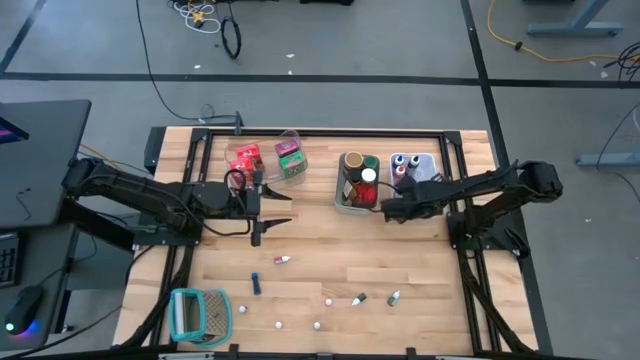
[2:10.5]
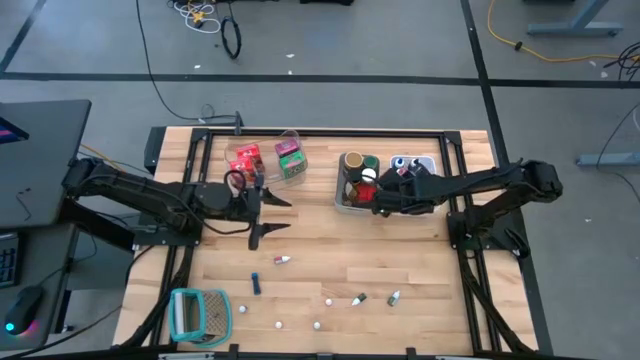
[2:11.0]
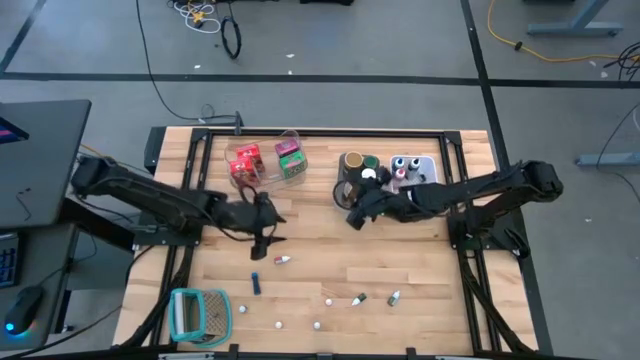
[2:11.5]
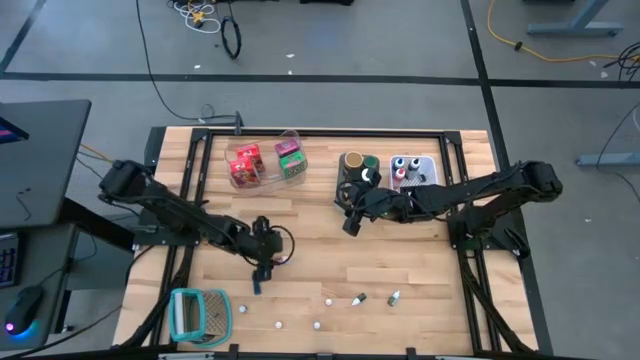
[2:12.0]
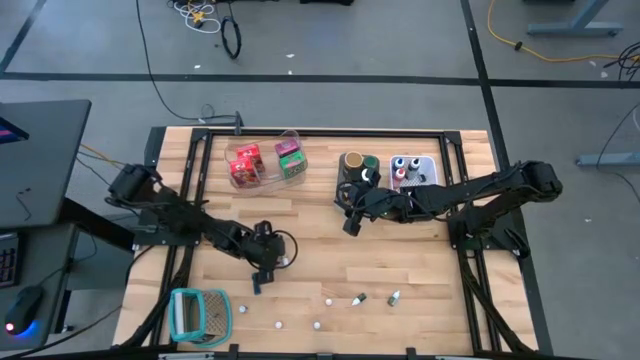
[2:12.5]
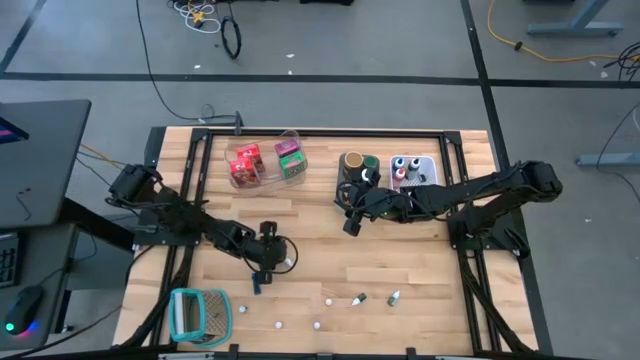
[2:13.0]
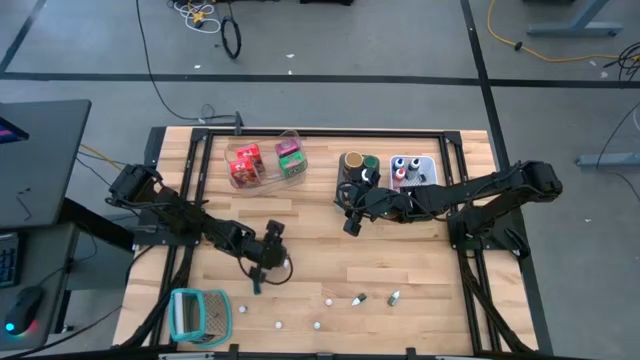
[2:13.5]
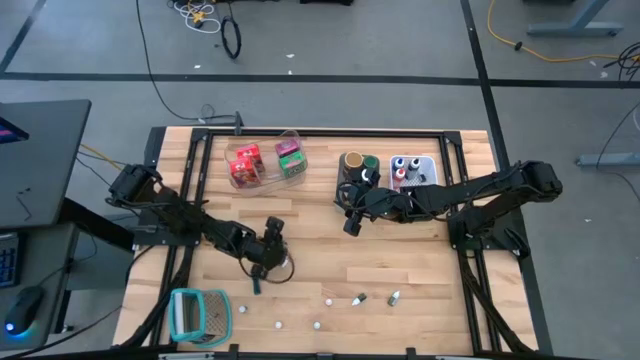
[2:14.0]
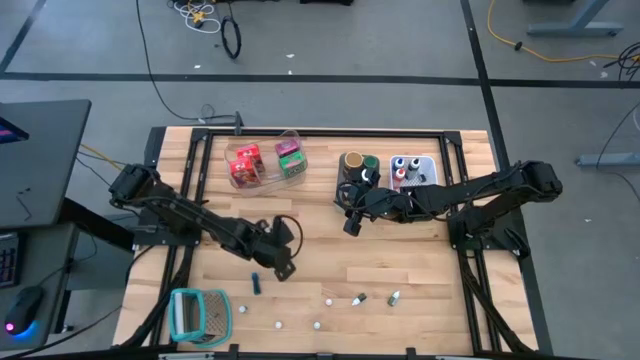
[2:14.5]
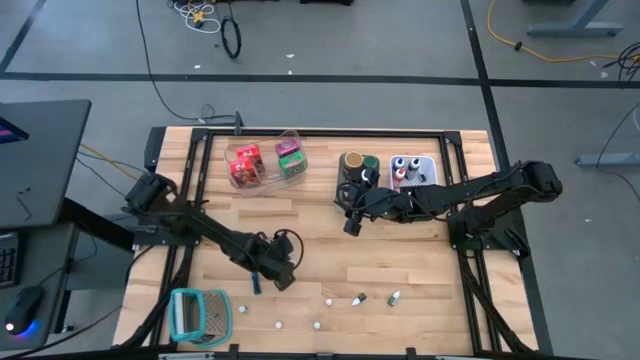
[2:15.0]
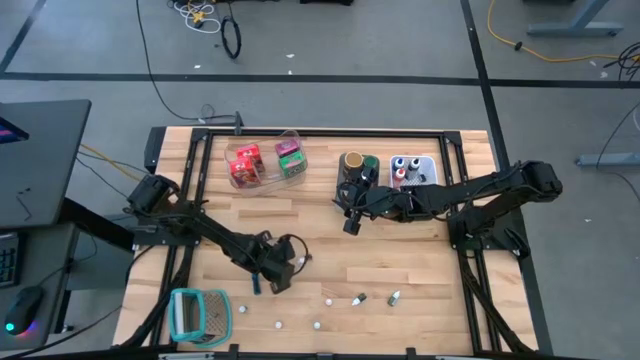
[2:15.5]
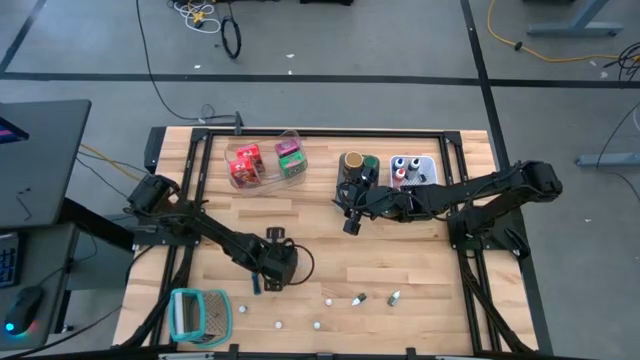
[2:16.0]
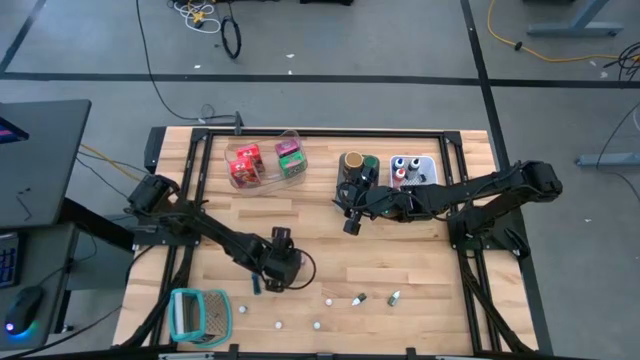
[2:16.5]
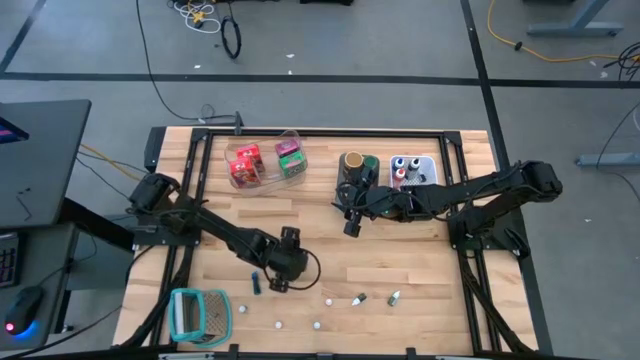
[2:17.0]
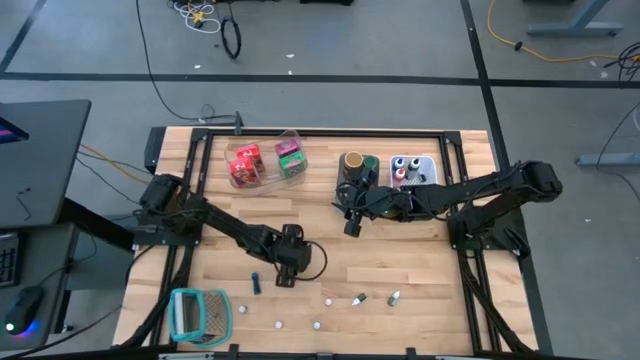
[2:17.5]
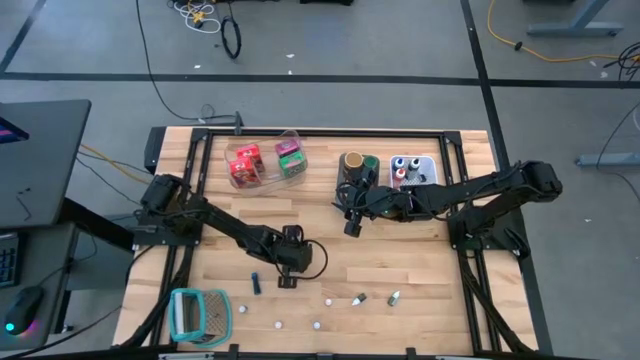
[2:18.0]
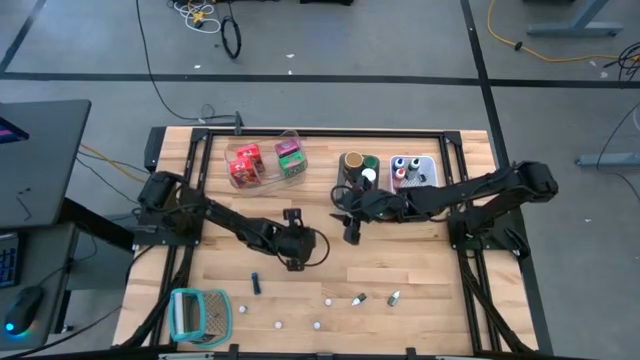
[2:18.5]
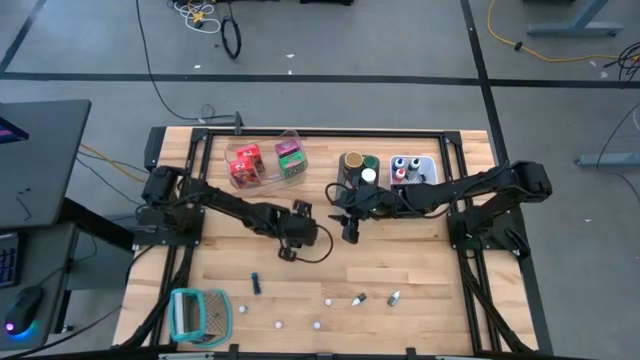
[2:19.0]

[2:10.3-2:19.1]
Task: Pick & Place Kitchen Items
Put the top small pink food coloring bottle into the white bin

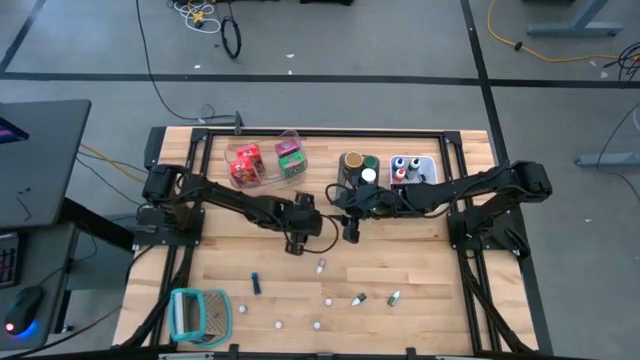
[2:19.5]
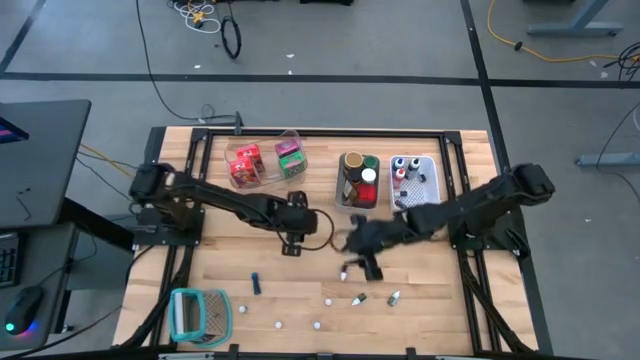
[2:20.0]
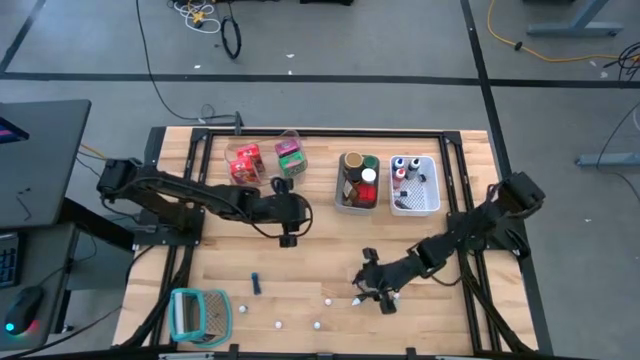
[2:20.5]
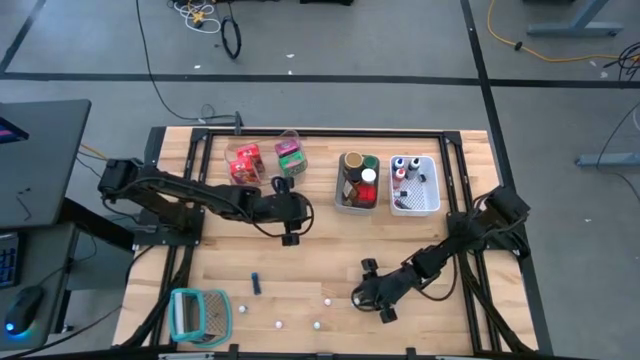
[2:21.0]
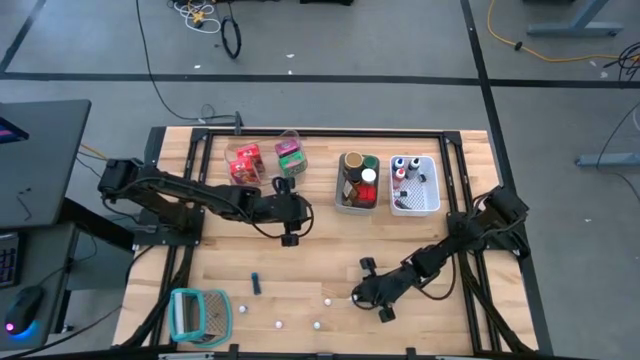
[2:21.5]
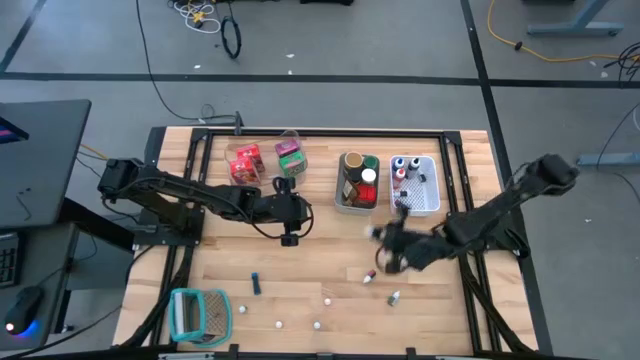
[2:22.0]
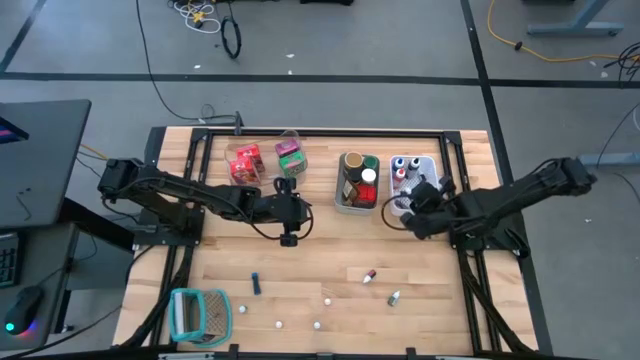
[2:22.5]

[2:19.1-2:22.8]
Put the left small green food coloring bottle into the white bin

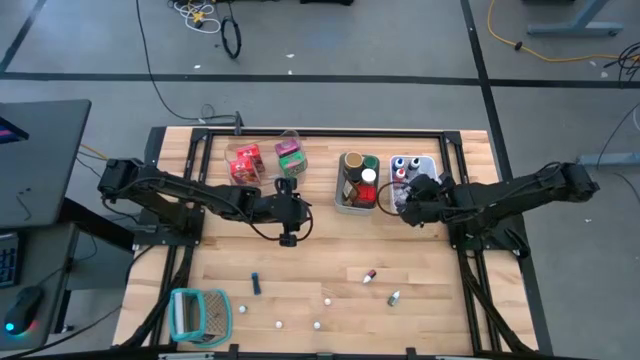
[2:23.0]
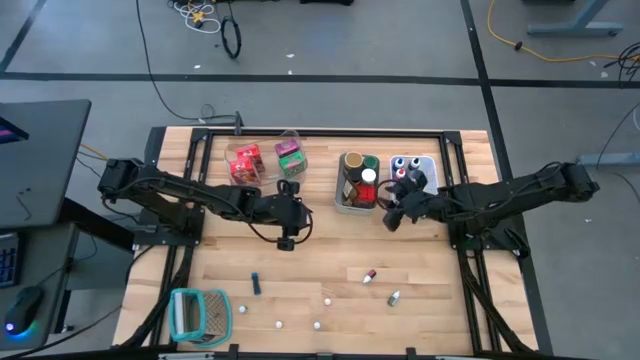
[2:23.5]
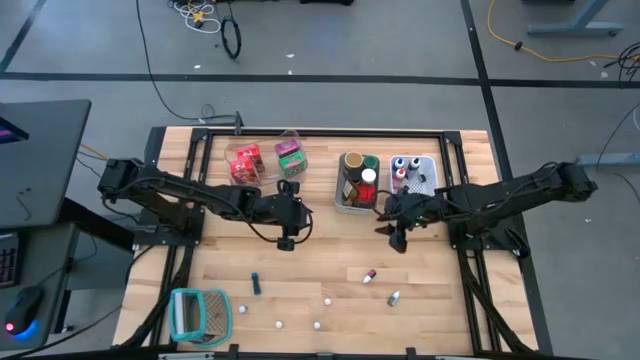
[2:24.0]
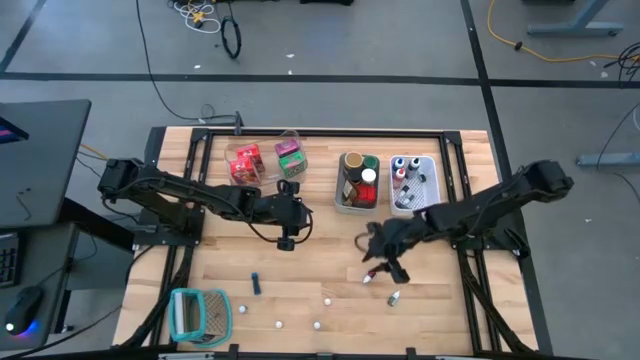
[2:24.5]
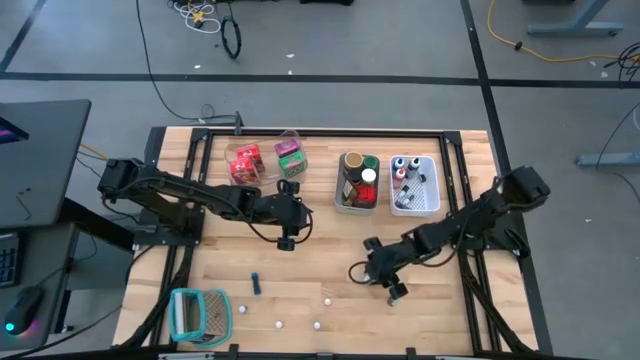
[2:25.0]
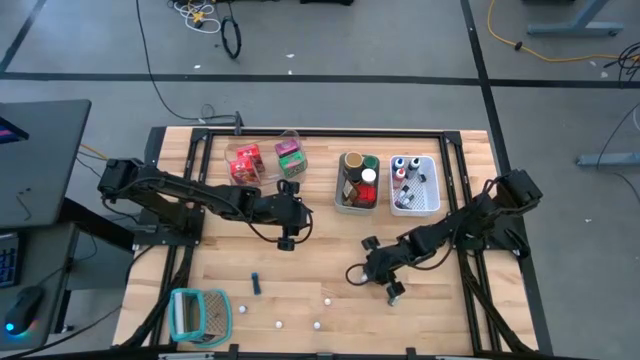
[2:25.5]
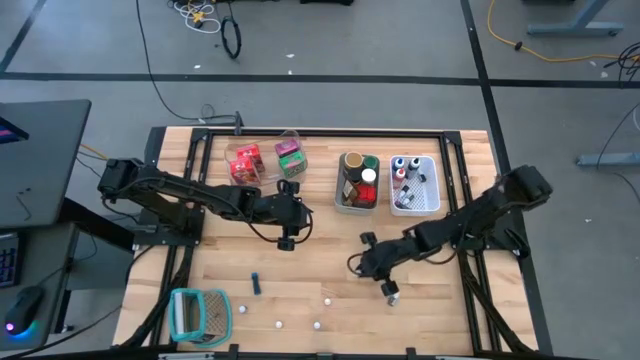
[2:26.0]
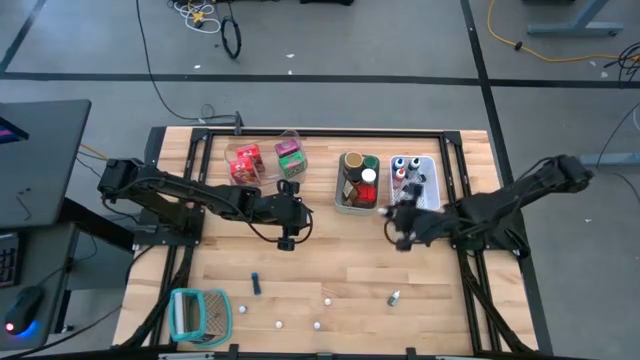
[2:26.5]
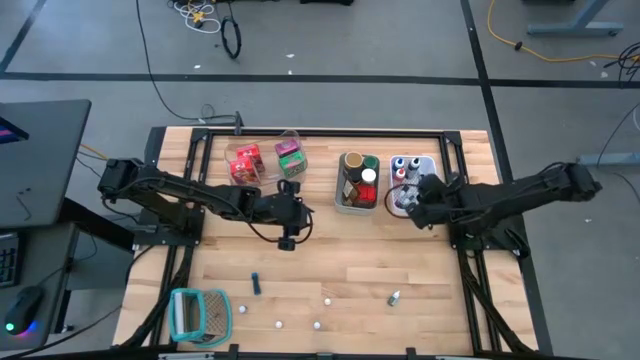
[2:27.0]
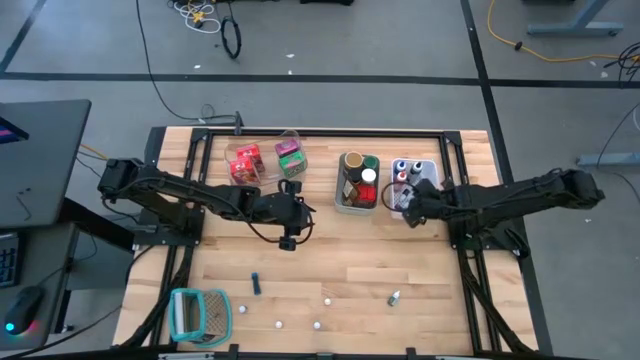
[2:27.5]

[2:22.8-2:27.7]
Put the top small pink food coloring bottle into the white bin

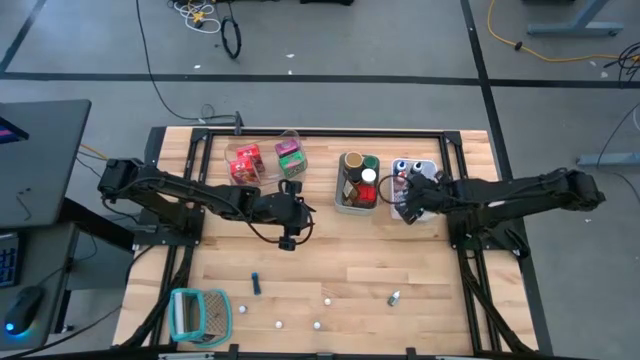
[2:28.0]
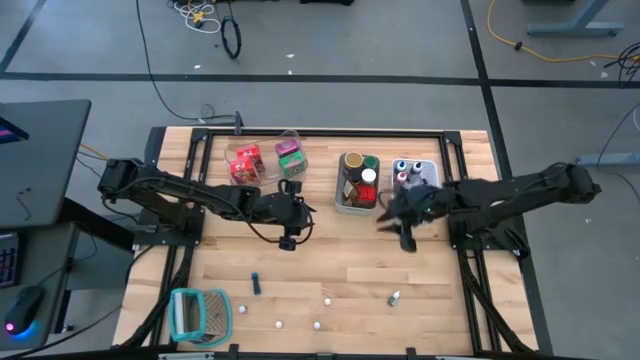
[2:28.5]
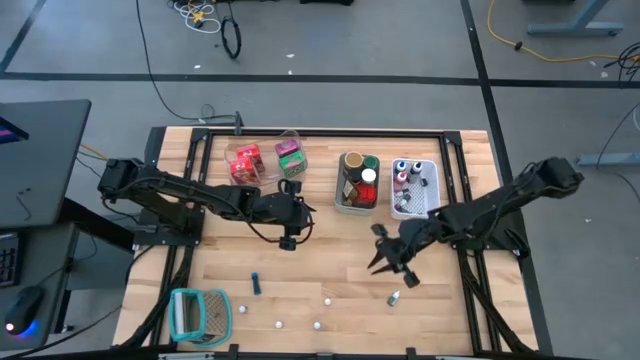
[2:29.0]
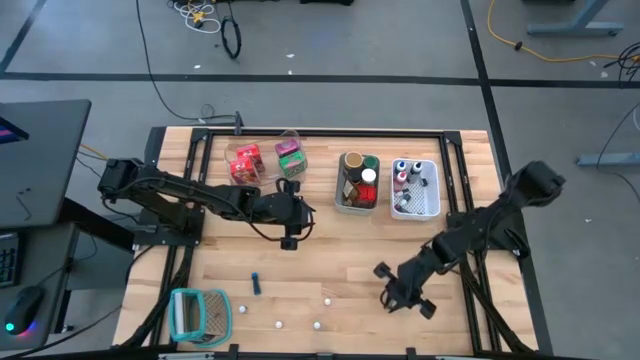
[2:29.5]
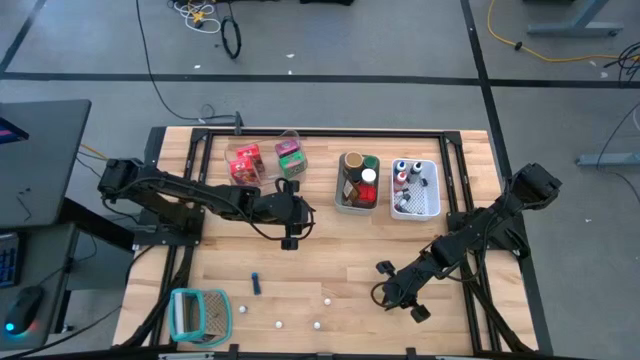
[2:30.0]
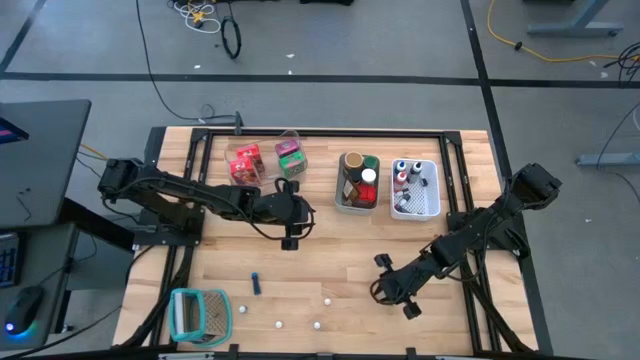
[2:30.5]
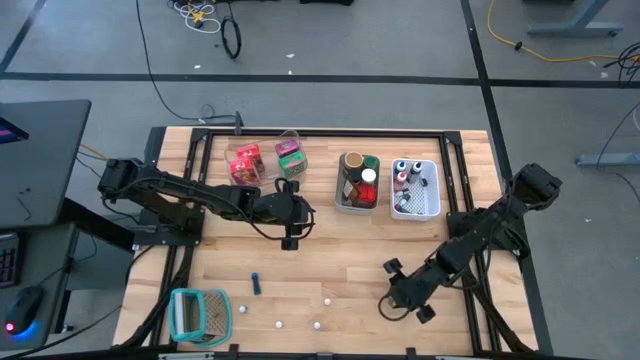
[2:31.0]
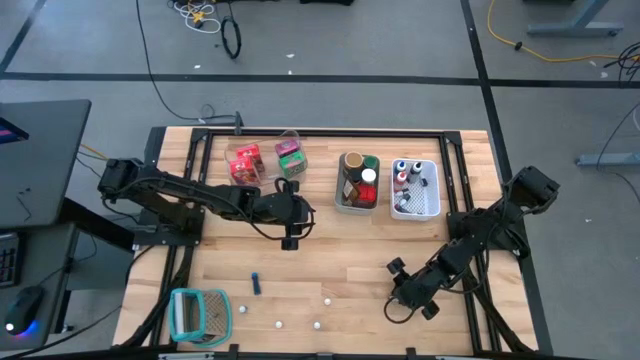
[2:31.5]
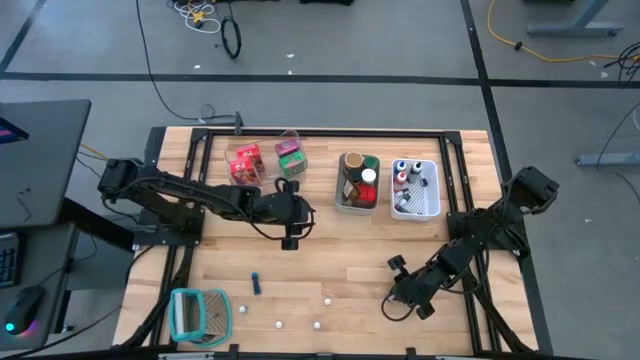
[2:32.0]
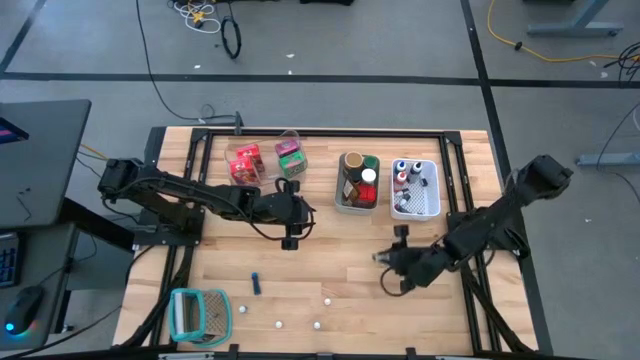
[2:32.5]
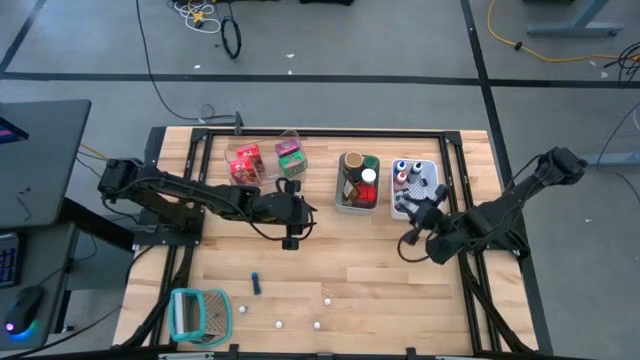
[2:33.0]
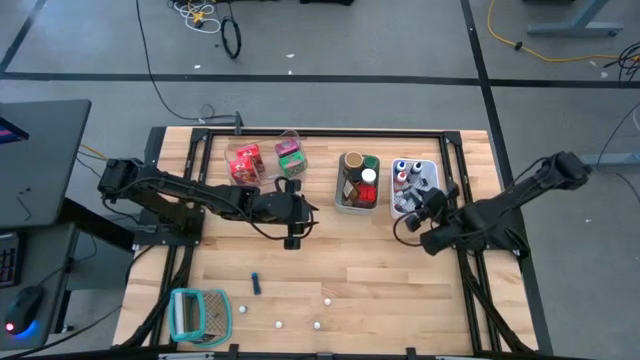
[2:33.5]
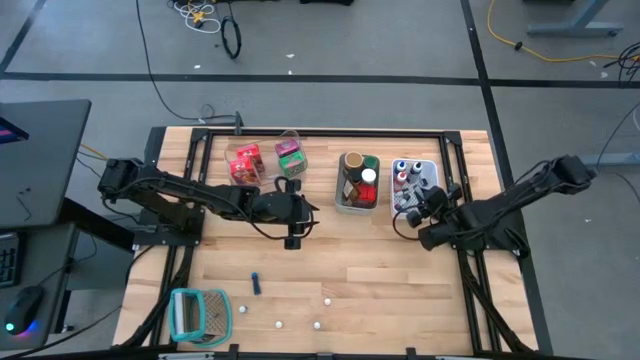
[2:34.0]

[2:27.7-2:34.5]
Put the top small green food coloring bottle into the white bin
